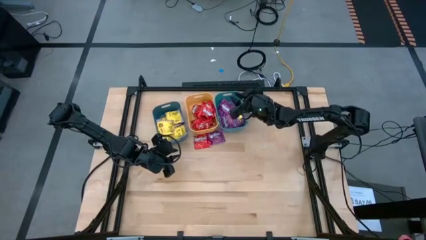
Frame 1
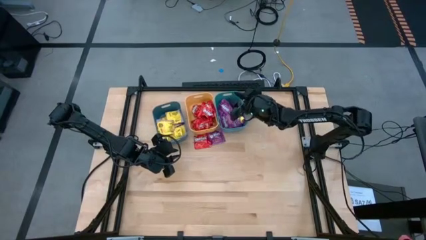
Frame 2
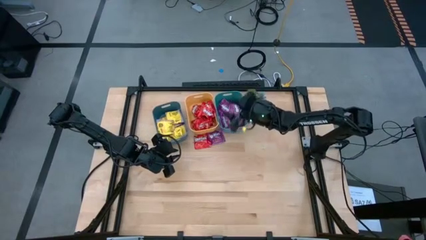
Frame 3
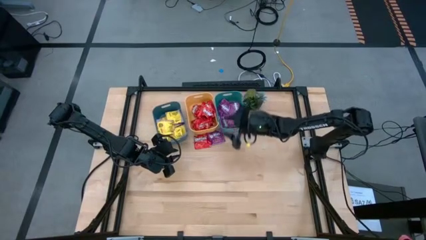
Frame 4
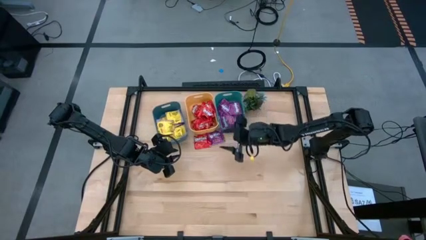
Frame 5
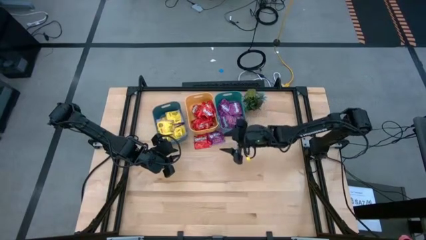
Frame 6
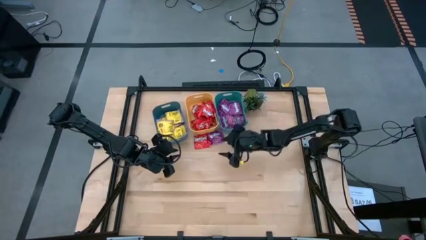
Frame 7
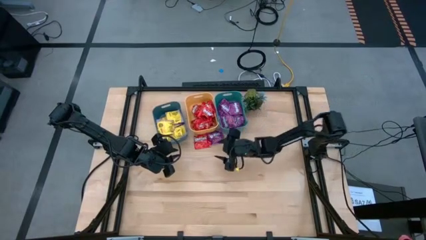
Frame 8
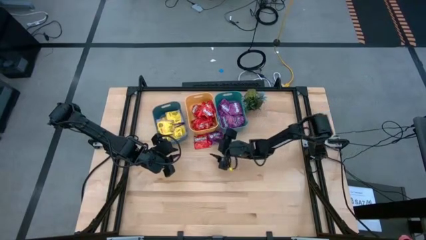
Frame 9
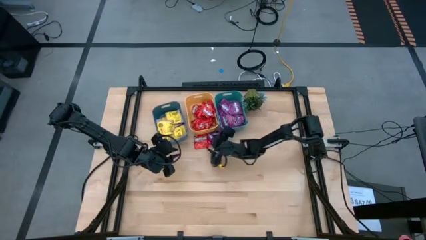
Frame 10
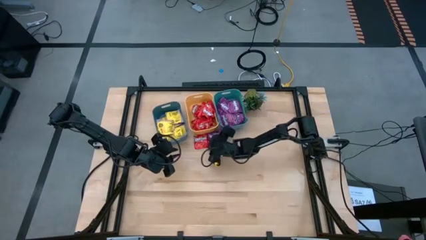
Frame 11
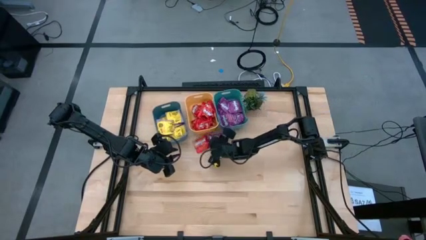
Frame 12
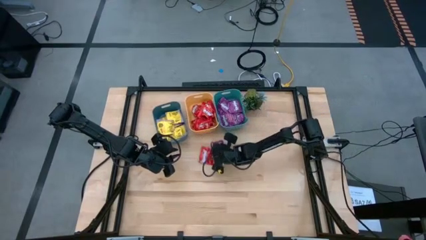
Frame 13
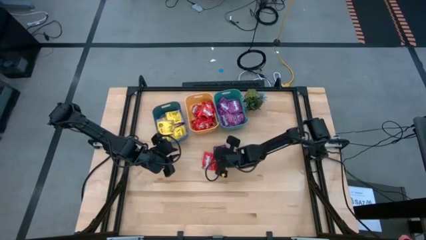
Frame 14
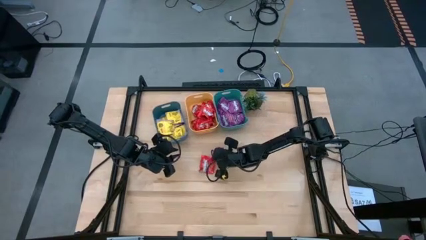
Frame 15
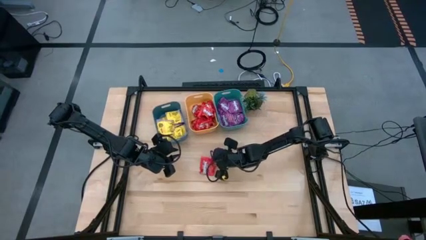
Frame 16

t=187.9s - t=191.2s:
Task: Sort candy
Put the purple candy into the green bin

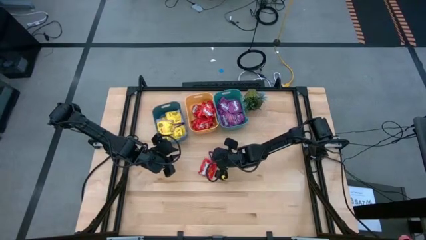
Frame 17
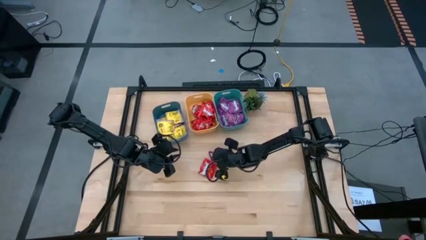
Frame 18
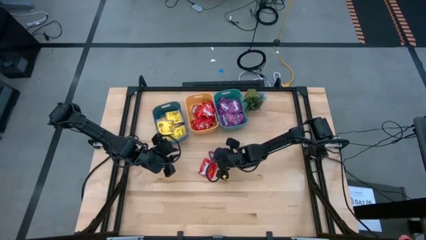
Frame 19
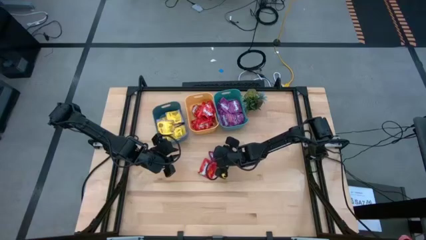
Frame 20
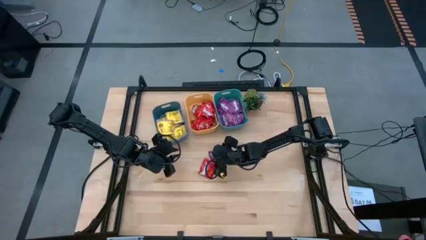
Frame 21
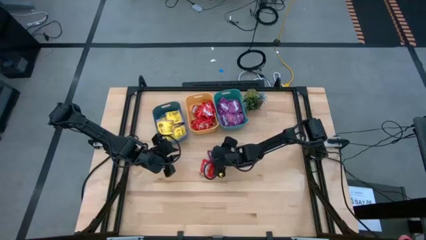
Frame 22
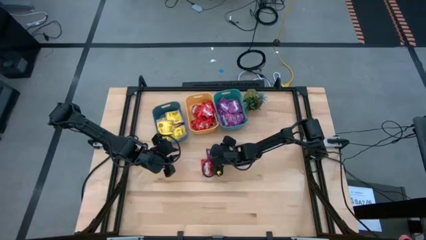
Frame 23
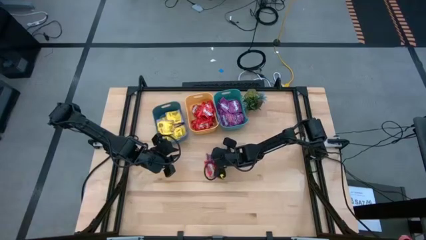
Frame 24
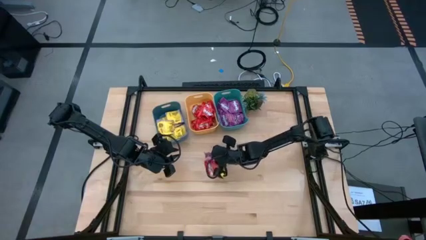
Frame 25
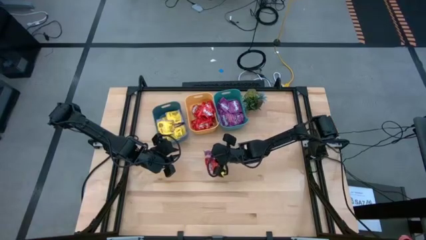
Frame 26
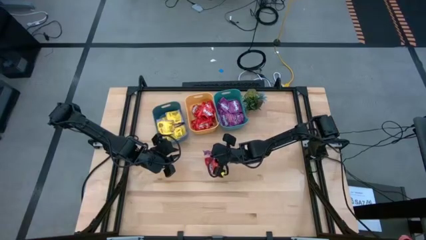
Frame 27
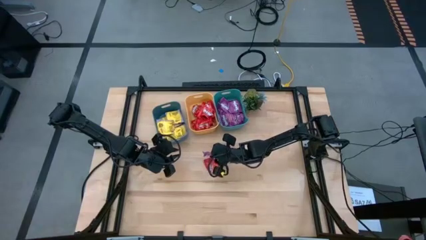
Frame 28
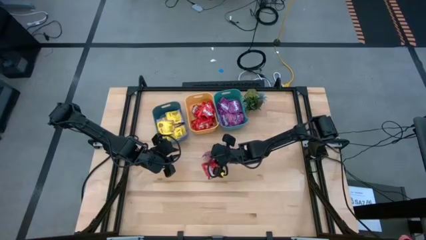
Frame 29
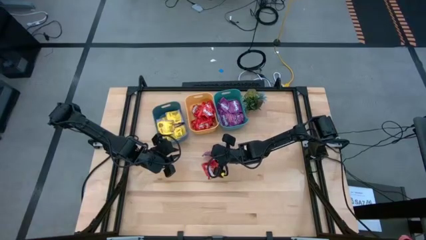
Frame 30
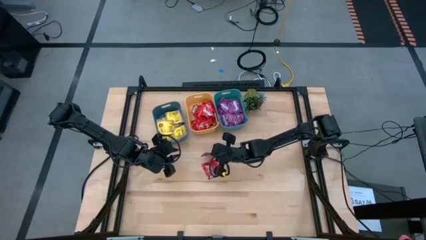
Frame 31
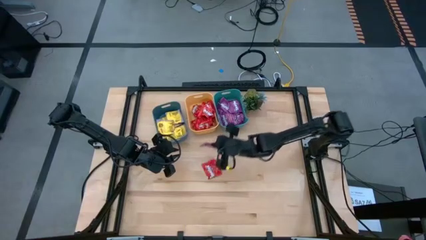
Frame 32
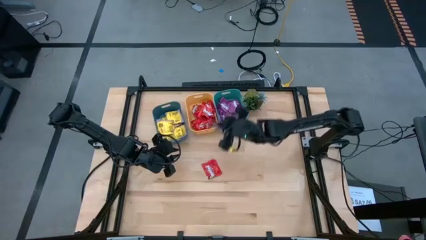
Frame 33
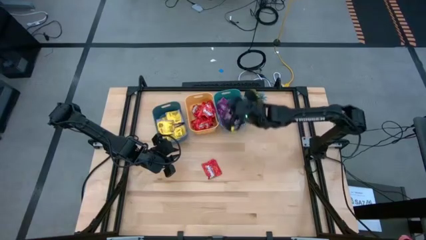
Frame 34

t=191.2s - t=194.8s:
Put the purple candy into the green bin

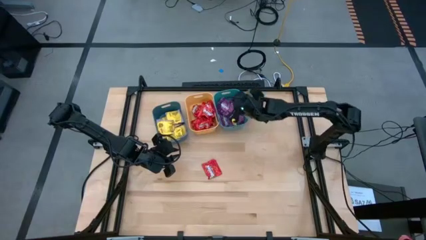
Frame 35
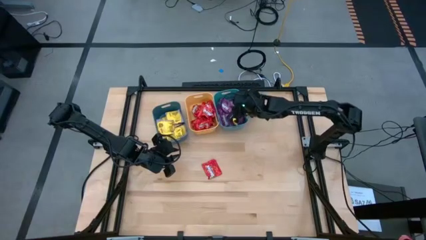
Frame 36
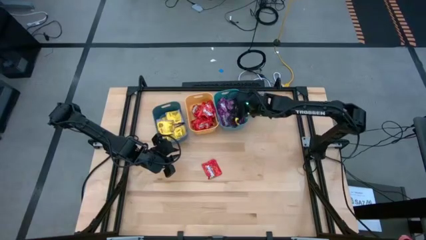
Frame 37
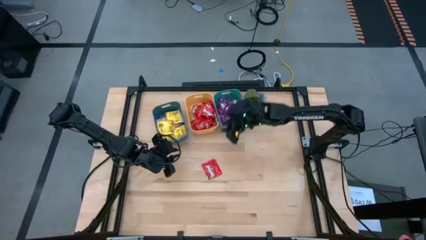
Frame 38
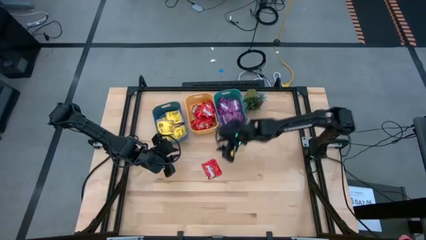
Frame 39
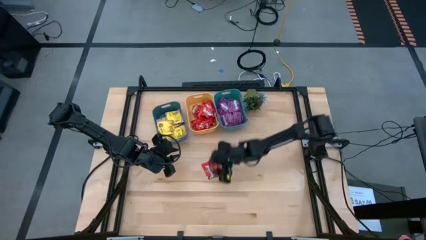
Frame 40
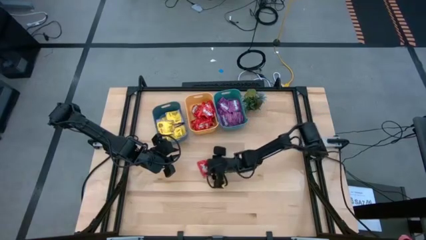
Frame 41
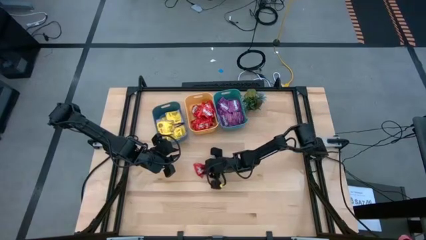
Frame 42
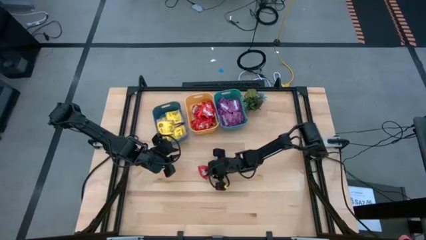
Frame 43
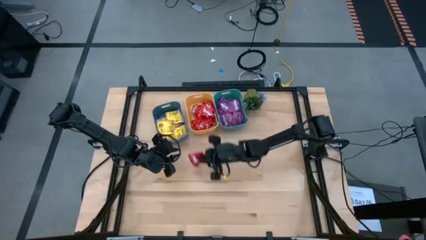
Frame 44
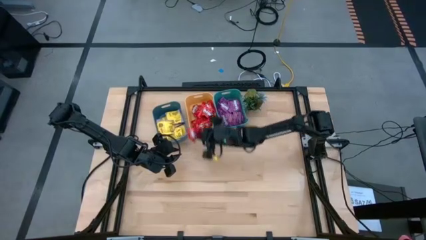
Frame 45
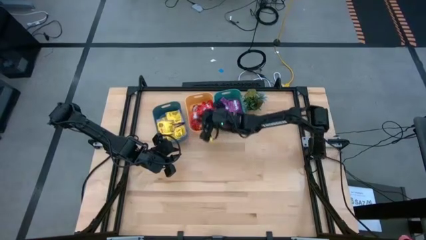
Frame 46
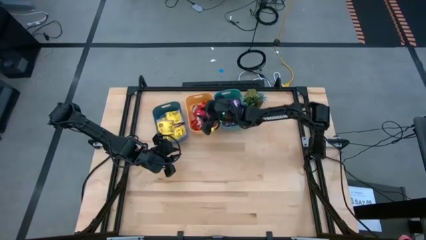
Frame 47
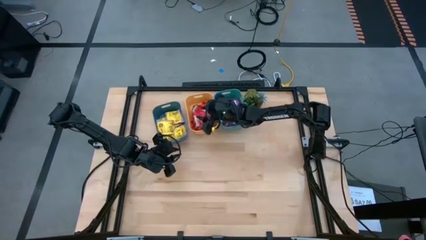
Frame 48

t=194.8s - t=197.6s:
Put the red candy into the yellow bin
